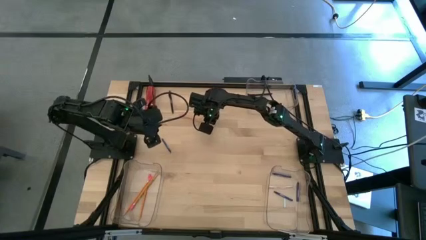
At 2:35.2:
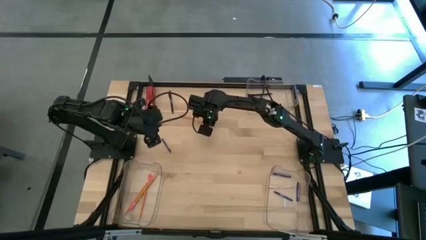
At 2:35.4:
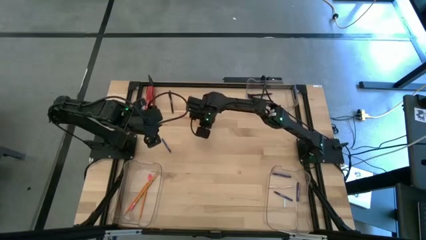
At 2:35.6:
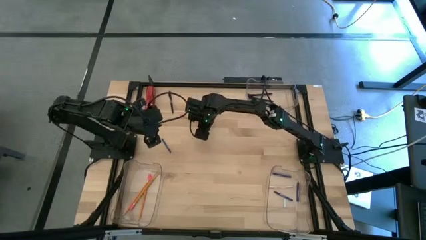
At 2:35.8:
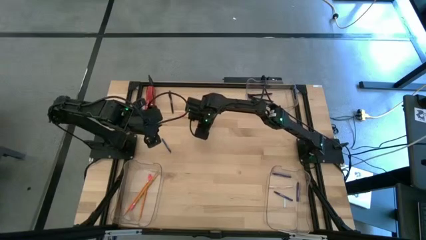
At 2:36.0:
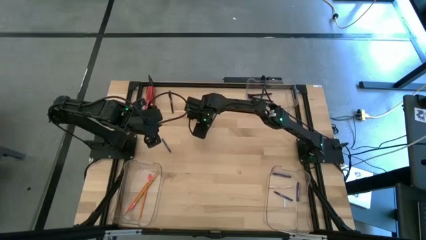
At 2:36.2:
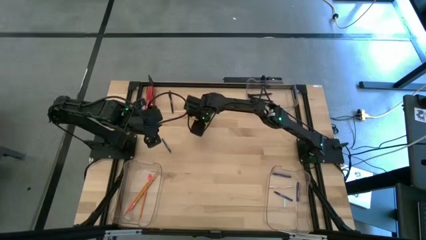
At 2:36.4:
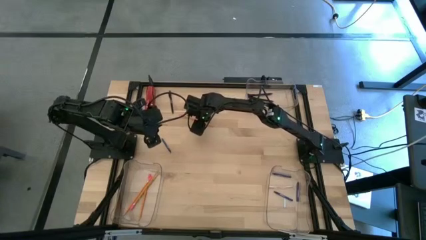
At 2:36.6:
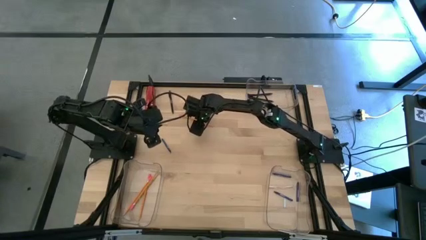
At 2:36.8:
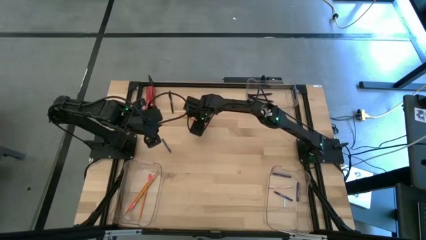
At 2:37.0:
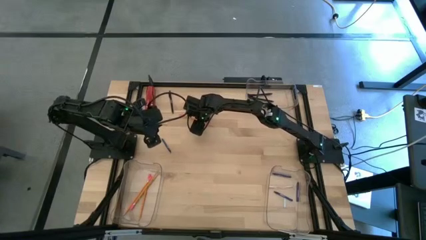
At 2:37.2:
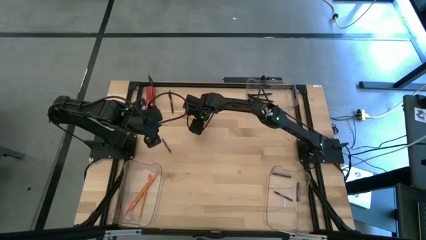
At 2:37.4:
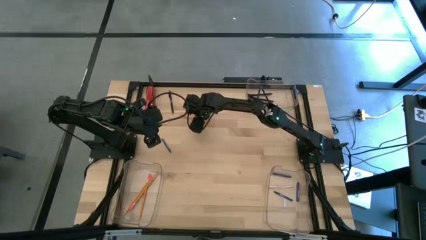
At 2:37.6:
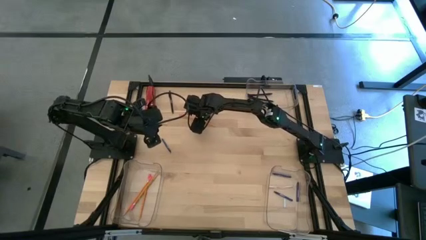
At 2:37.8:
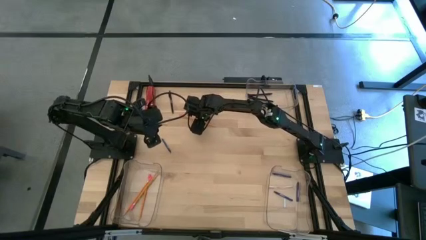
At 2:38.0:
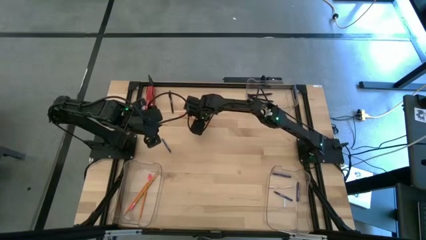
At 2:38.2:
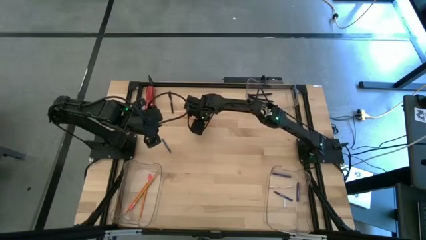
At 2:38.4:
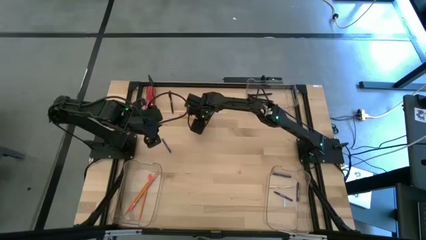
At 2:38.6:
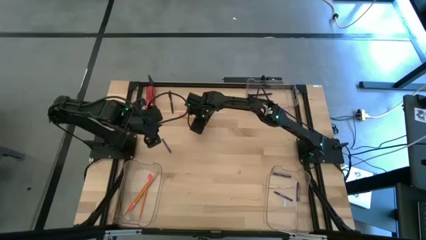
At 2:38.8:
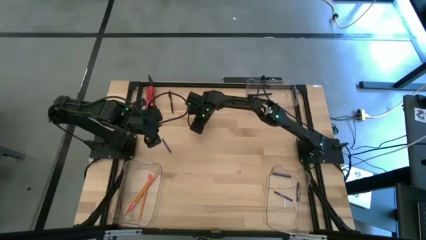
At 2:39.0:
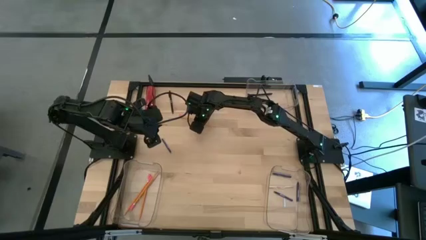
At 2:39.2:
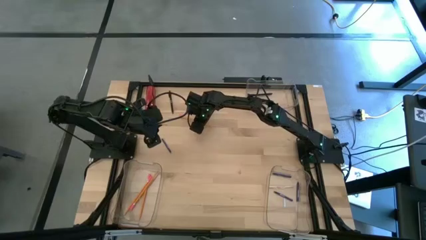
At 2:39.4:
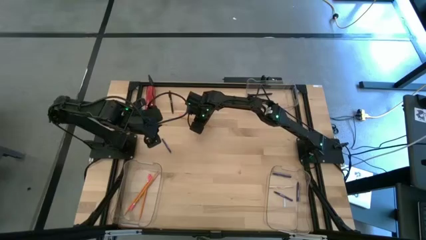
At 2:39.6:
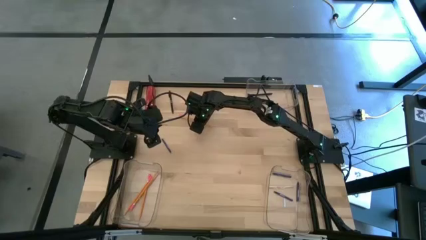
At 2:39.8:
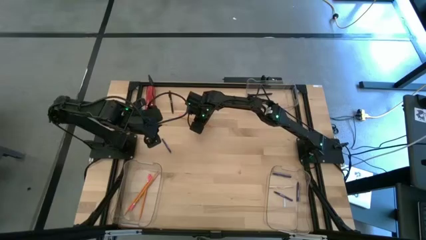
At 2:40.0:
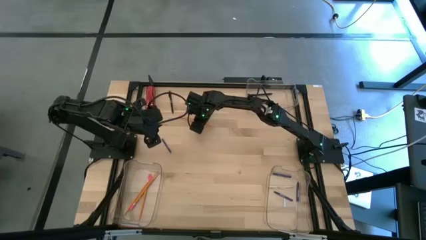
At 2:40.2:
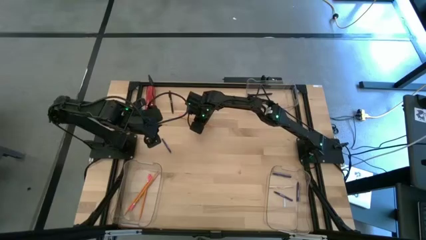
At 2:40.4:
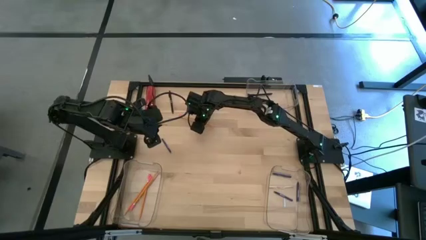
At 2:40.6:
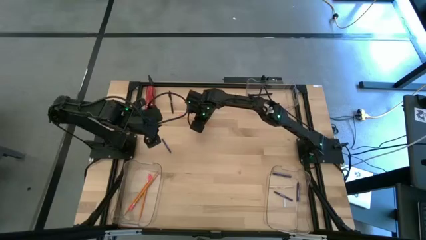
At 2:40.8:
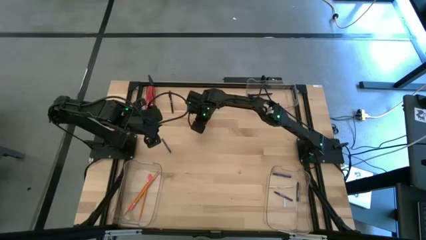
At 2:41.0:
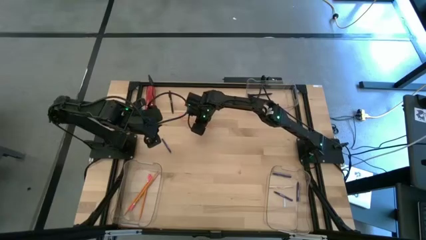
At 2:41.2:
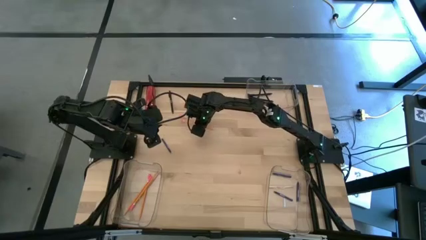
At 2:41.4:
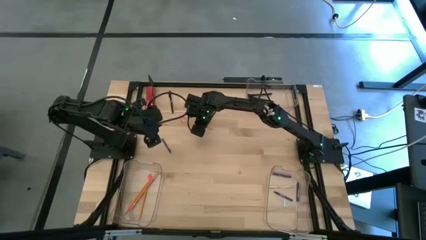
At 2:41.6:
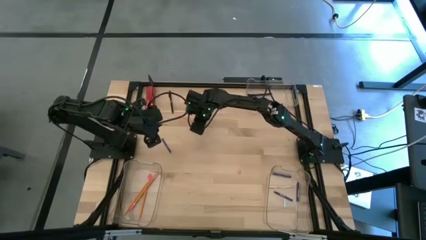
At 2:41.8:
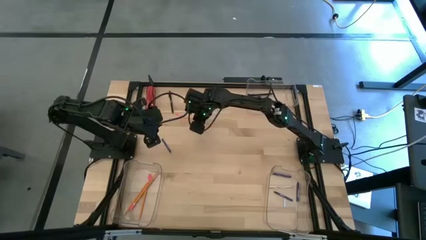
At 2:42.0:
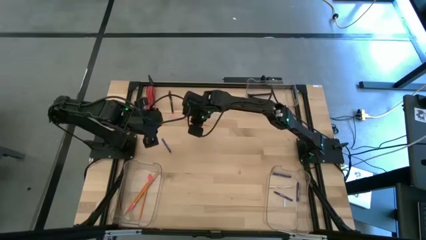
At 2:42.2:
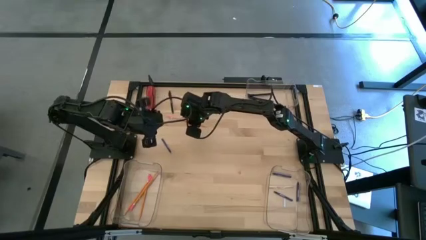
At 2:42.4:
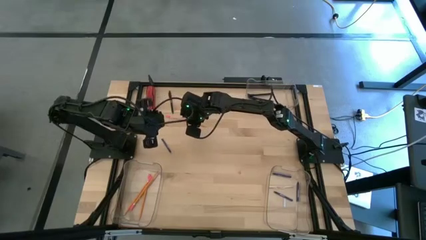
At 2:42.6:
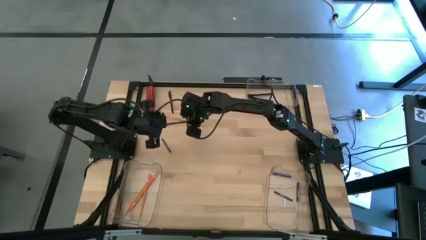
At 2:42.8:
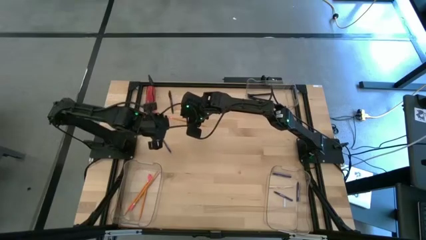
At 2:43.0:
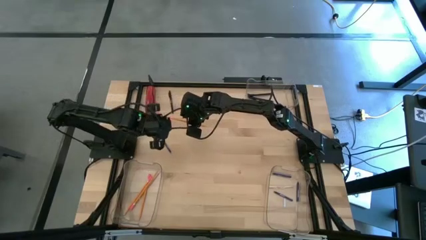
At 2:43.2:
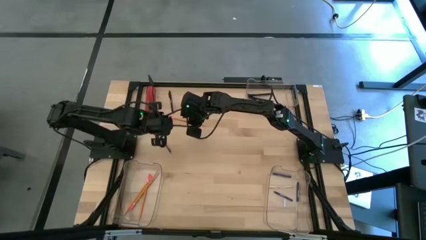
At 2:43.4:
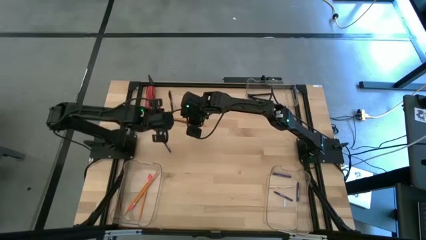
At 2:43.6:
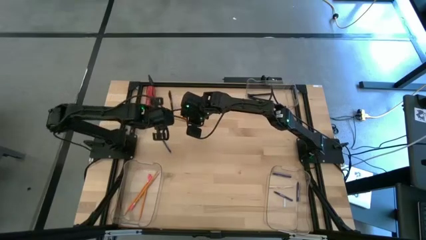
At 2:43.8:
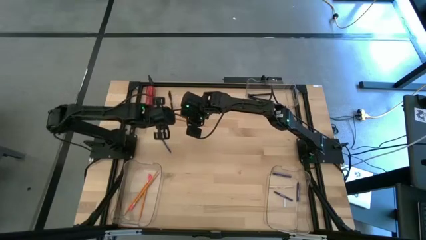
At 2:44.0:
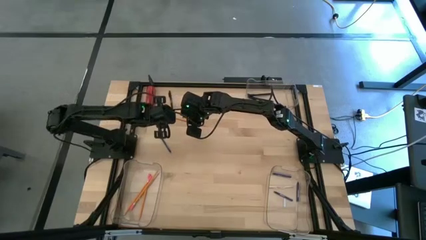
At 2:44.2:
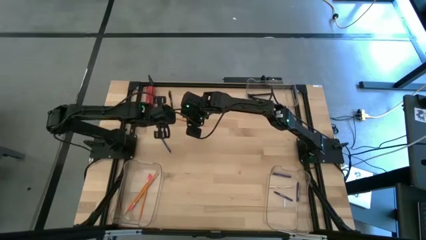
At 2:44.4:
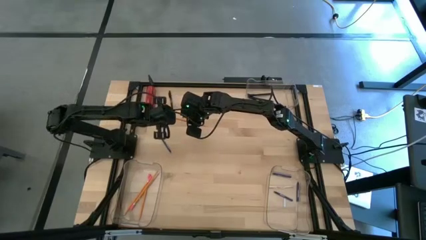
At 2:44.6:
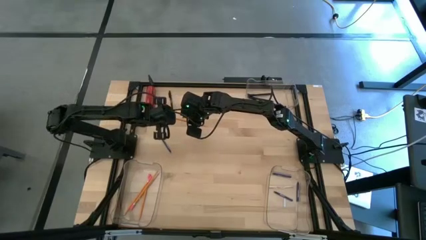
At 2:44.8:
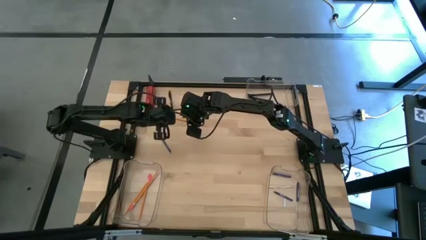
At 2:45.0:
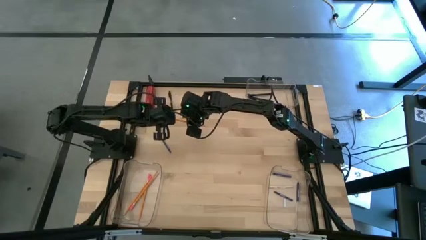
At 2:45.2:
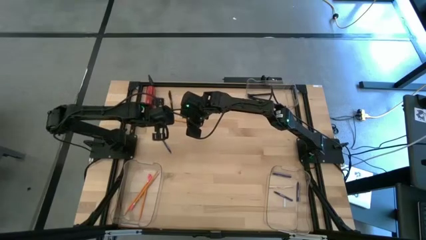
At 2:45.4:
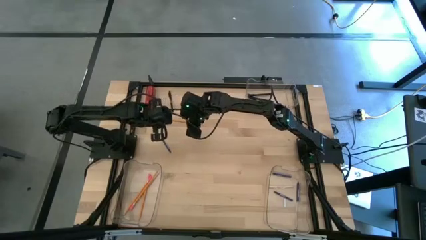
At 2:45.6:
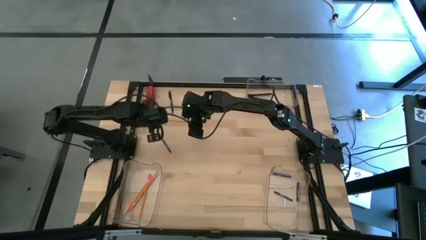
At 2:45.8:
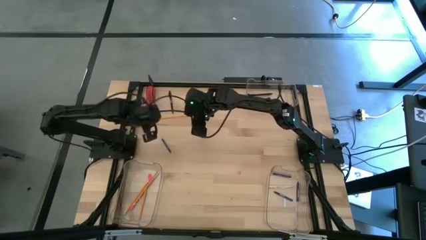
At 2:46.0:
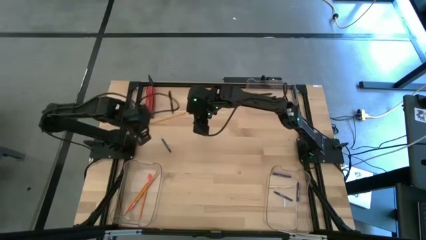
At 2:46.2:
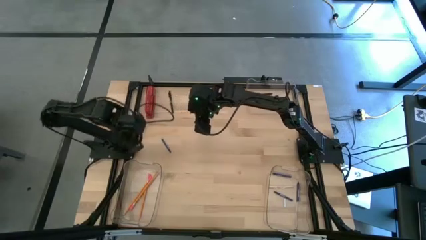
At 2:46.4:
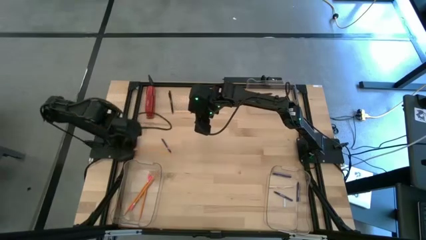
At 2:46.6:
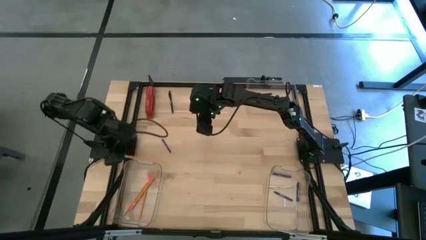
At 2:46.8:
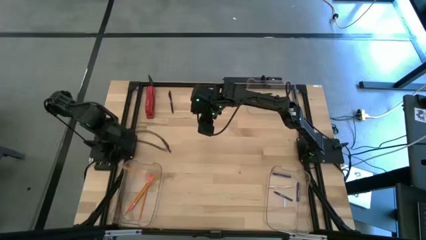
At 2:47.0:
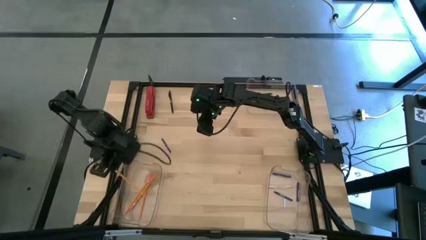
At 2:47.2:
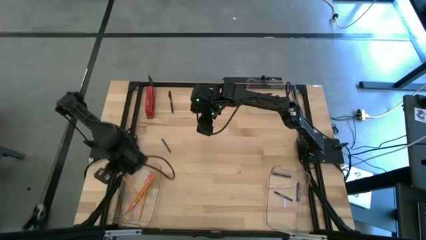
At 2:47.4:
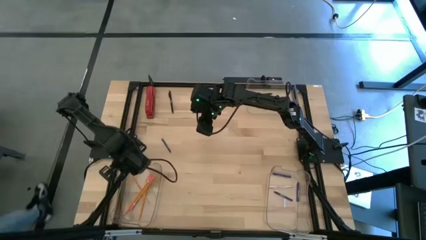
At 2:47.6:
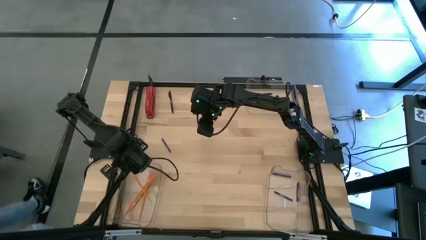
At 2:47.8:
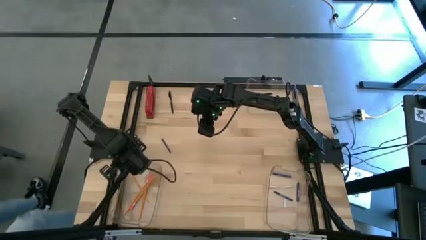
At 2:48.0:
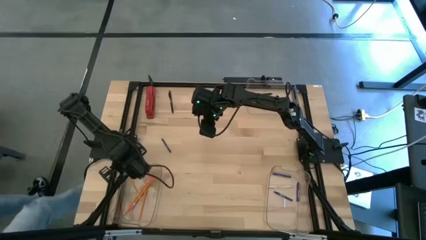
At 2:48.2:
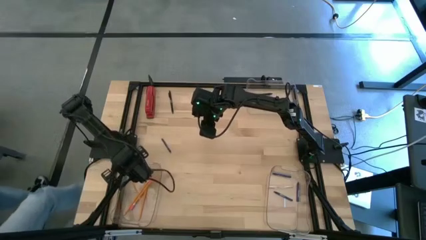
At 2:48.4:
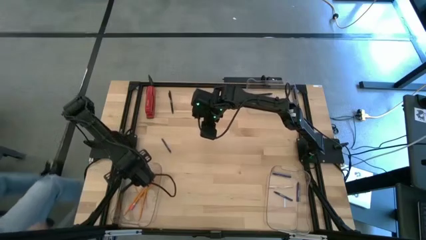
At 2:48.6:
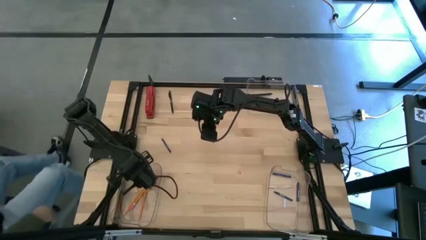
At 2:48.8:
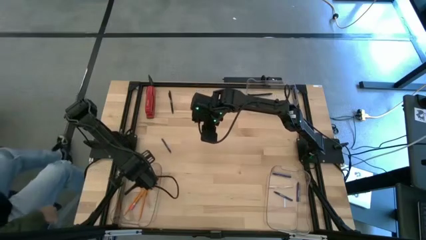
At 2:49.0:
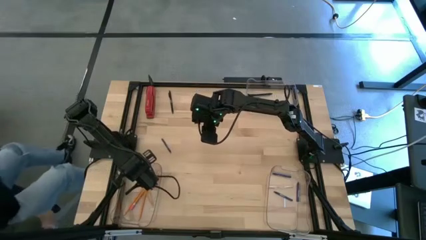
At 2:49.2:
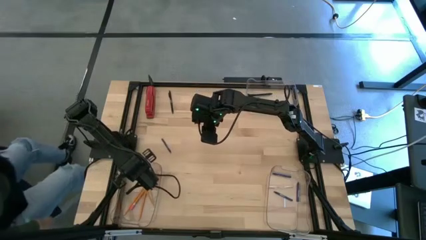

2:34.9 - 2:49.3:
Task: Sort crayons/erasers/pens/pencils in bins
Put the yellow pencil into the bottom left transparent bin
